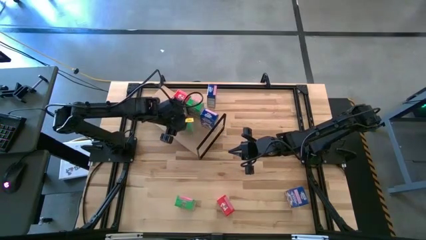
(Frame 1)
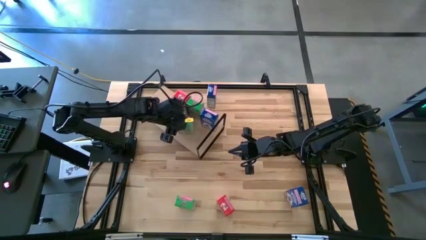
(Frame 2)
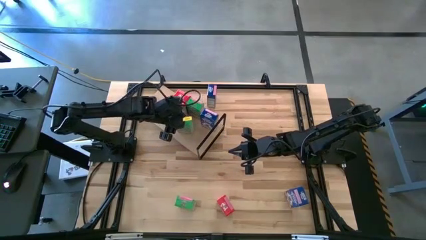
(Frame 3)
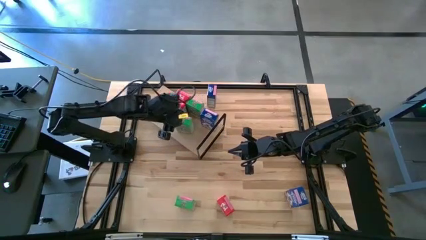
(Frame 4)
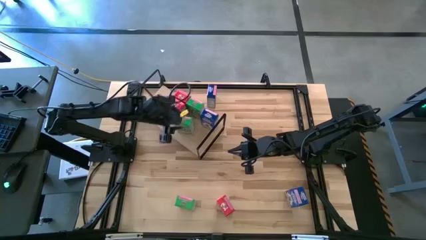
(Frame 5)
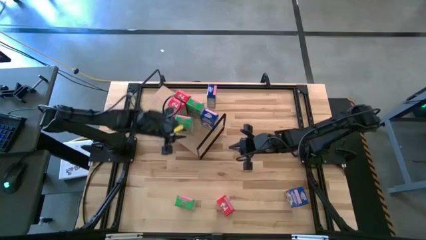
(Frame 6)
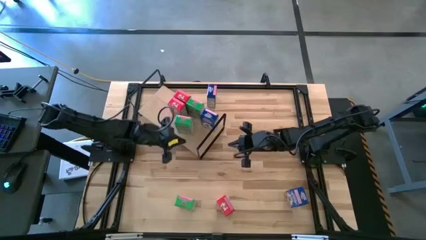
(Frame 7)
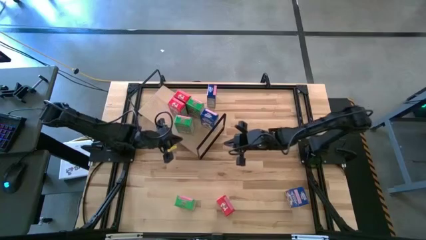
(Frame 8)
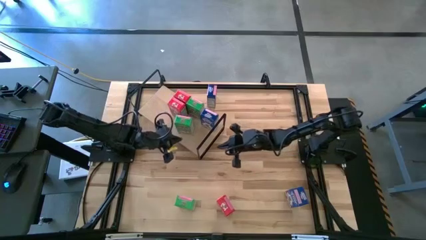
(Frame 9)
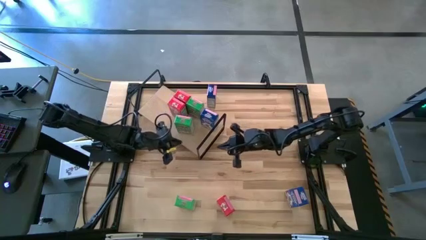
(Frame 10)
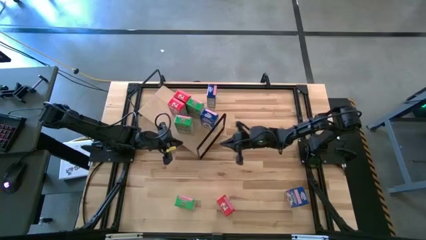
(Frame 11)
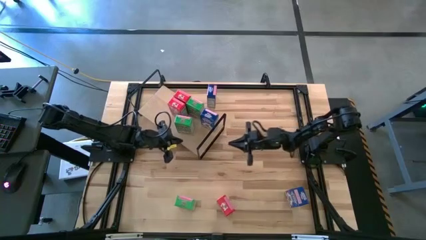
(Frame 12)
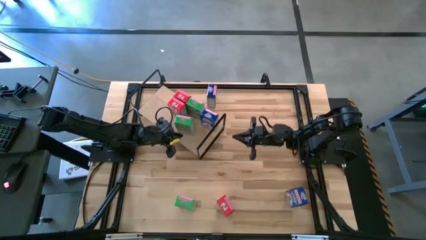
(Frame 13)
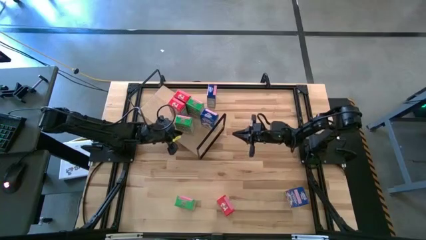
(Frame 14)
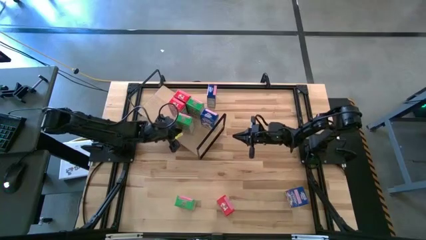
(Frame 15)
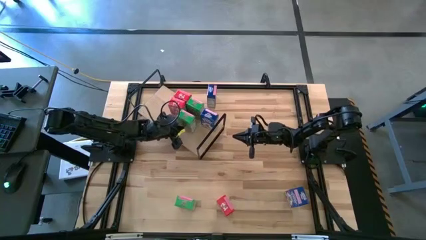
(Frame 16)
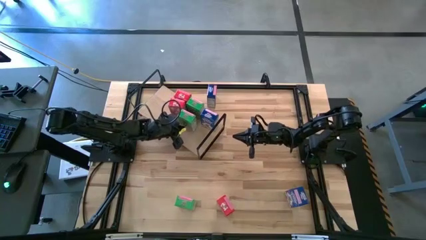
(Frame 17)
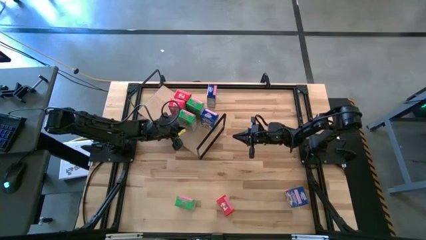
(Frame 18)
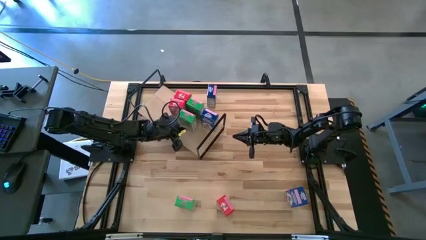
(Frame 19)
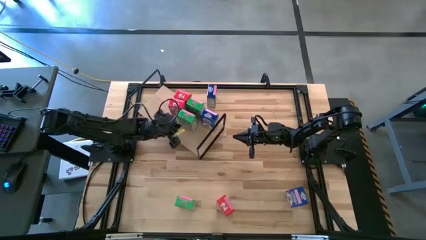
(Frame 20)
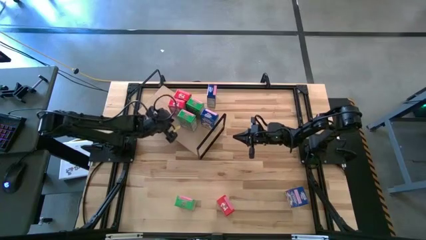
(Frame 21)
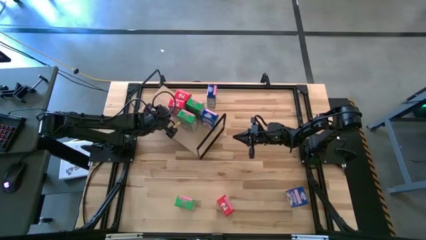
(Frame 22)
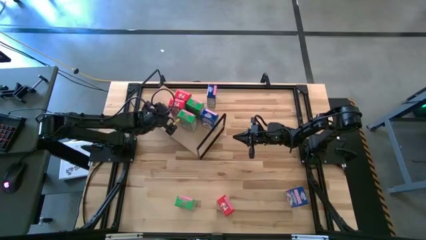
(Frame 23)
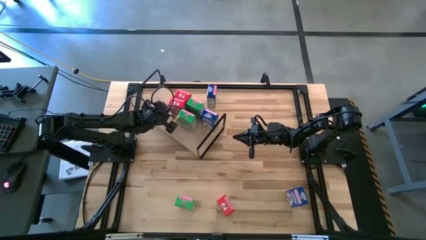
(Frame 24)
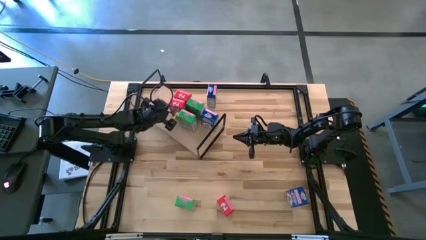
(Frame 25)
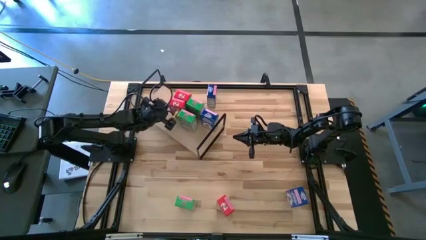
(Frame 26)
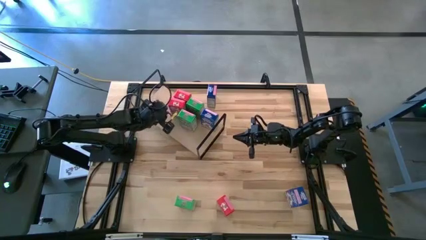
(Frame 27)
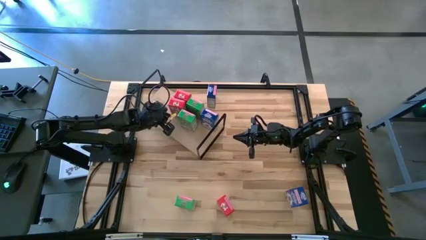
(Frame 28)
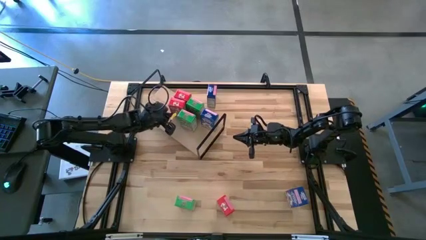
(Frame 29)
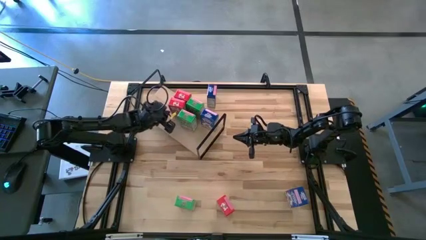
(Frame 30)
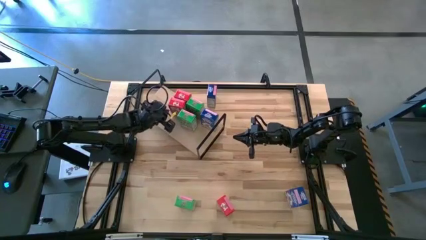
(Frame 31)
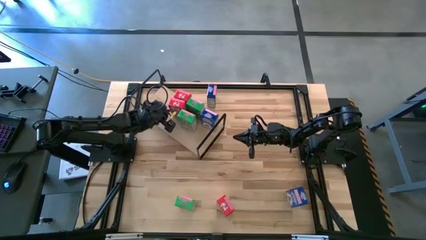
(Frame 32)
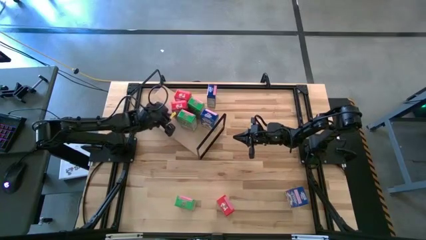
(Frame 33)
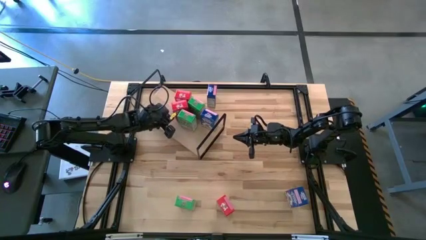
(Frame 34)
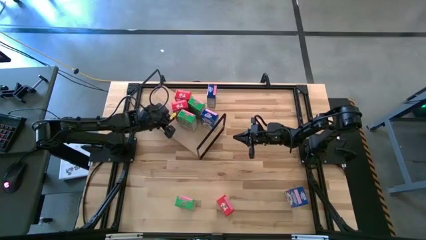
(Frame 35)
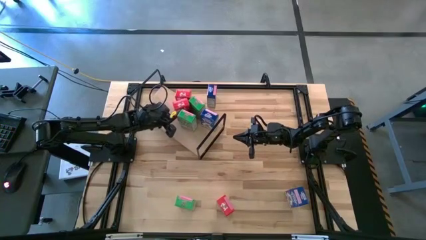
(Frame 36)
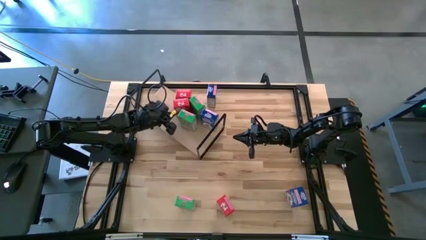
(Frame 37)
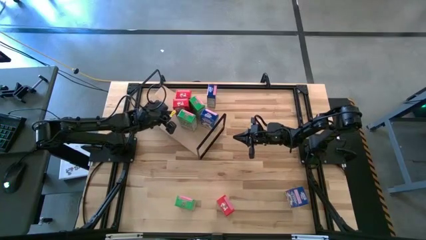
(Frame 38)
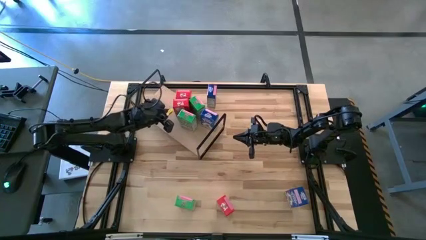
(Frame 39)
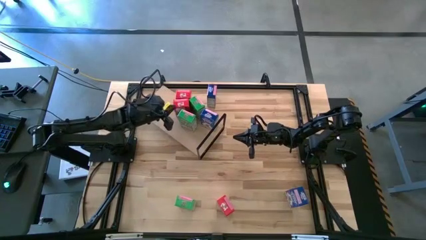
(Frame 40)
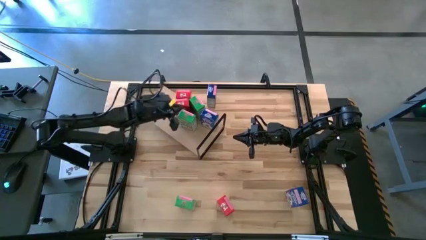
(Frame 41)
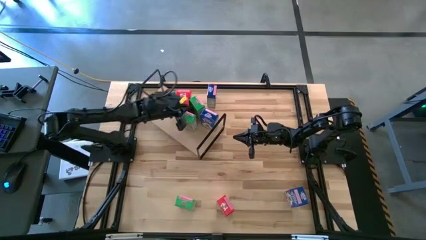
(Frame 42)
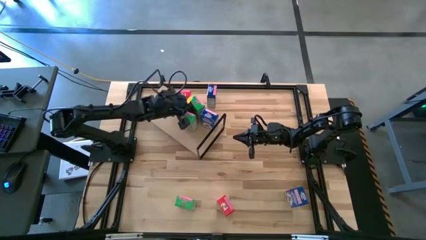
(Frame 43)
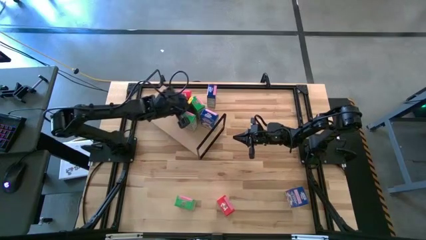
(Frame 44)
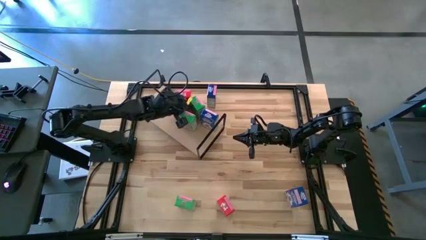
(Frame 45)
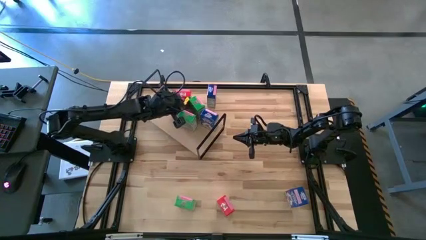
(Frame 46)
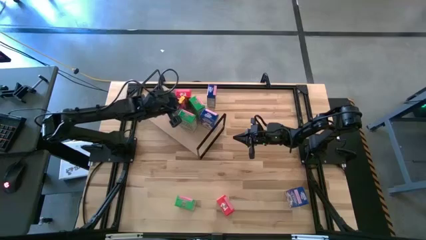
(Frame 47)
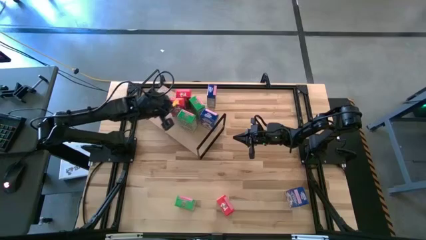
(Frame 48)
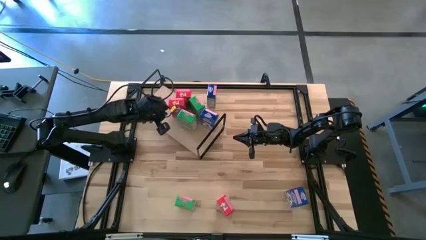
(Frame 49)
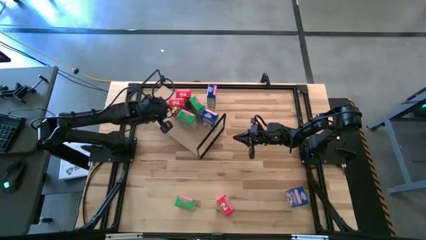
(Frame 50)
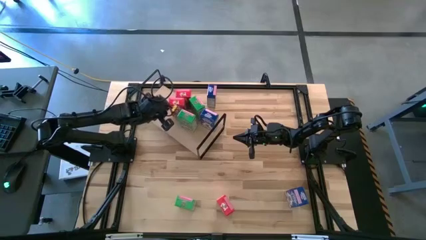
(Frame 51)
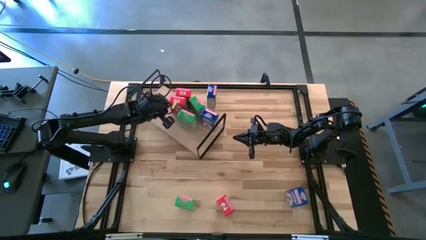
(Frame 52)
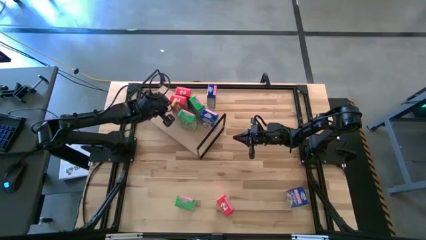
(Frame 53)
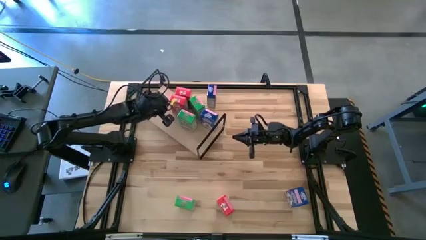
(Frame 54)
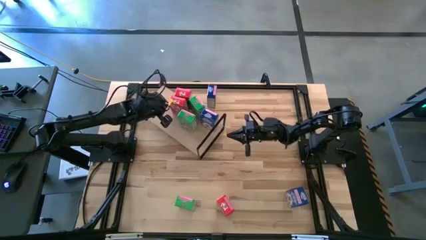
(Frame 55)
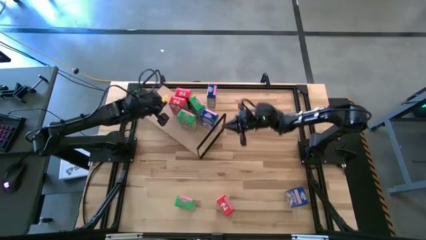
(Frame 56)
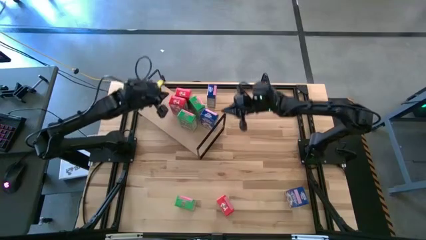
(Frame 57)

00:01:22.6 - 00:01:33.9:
Task: Stack cereal on shelf
Adjust the cereals on the shelf

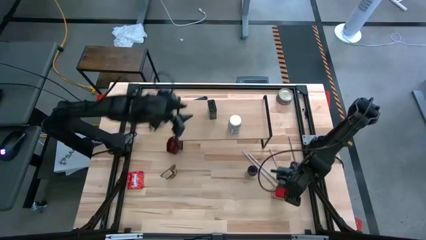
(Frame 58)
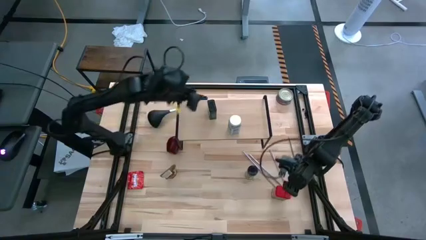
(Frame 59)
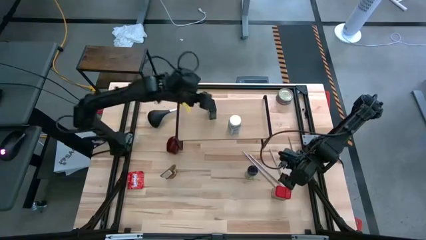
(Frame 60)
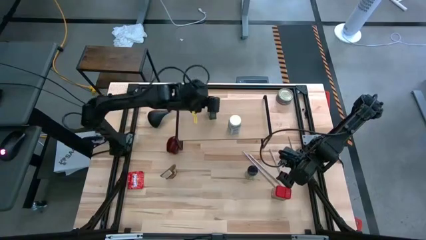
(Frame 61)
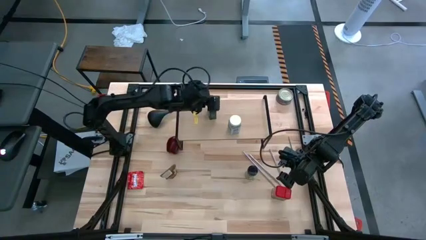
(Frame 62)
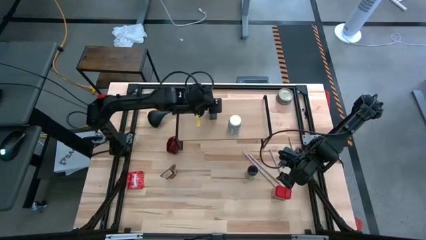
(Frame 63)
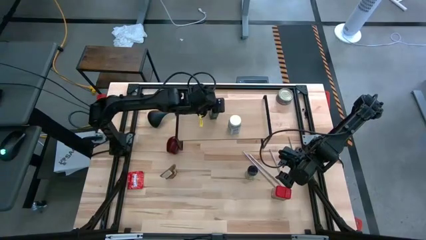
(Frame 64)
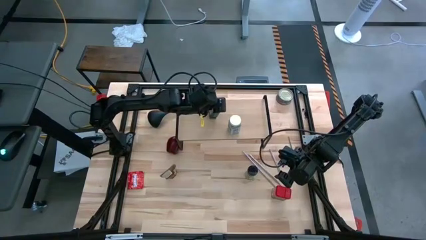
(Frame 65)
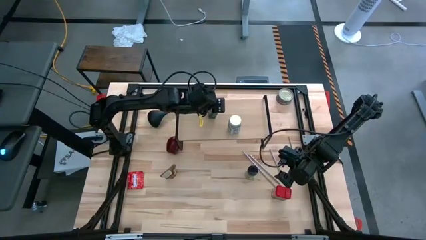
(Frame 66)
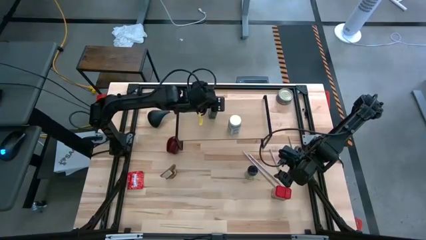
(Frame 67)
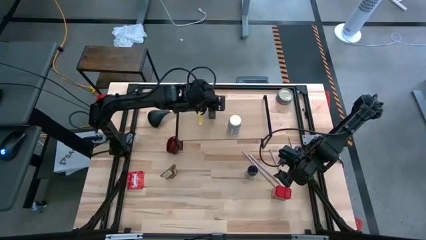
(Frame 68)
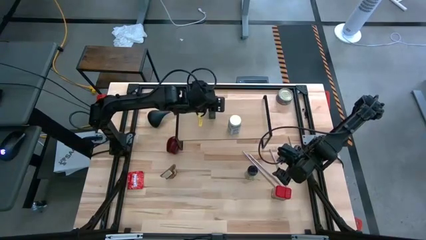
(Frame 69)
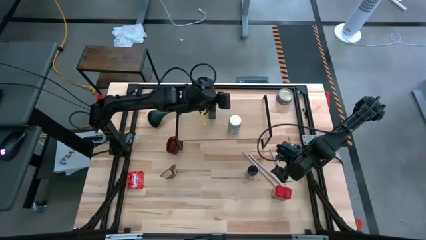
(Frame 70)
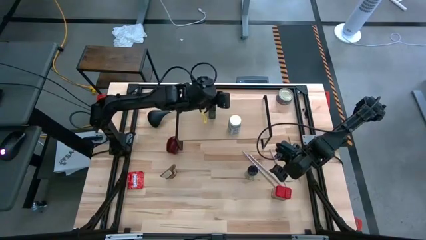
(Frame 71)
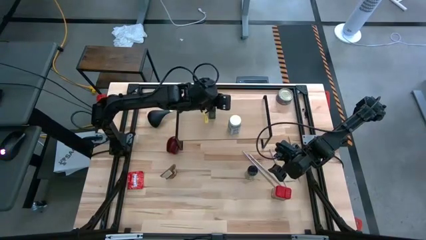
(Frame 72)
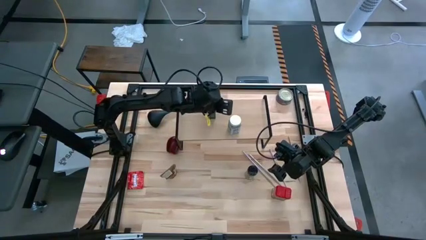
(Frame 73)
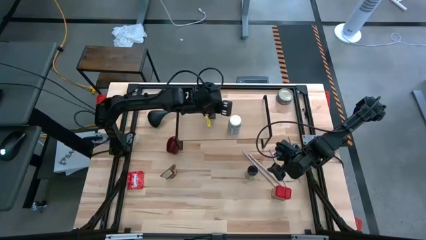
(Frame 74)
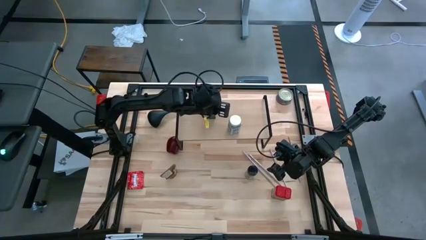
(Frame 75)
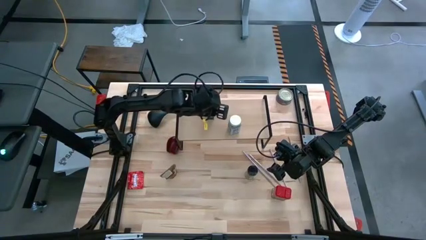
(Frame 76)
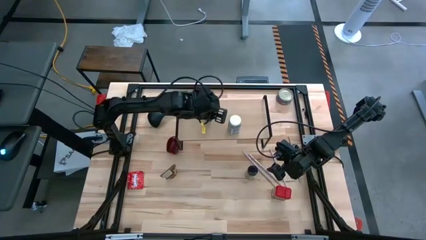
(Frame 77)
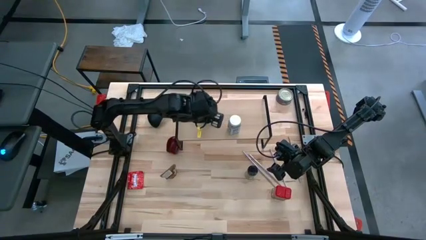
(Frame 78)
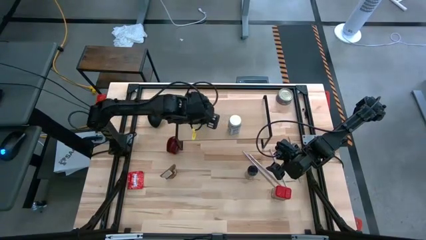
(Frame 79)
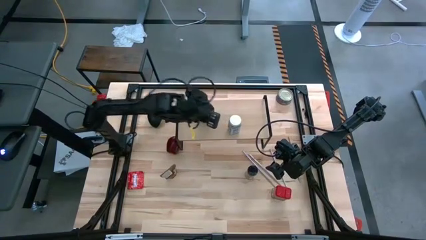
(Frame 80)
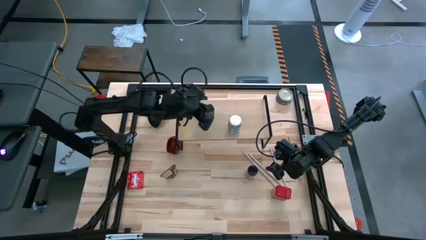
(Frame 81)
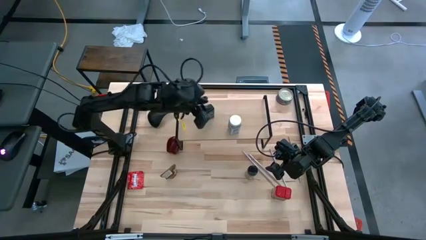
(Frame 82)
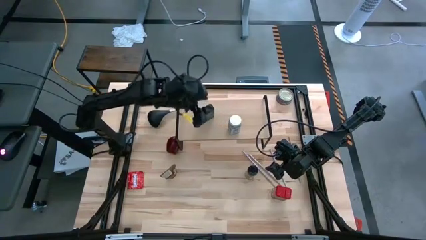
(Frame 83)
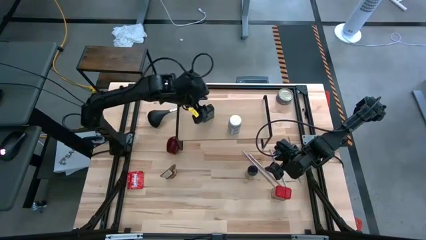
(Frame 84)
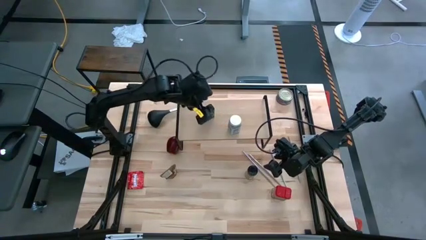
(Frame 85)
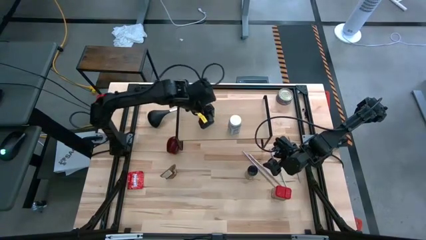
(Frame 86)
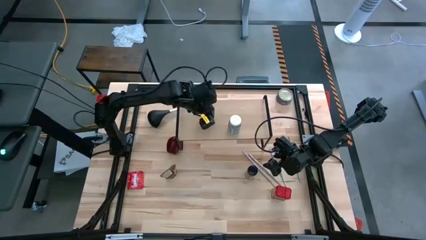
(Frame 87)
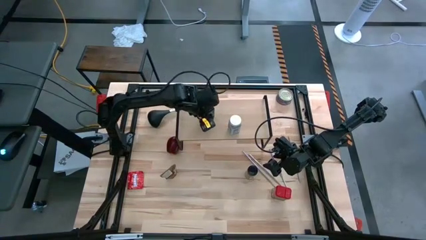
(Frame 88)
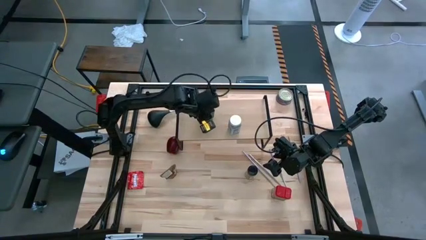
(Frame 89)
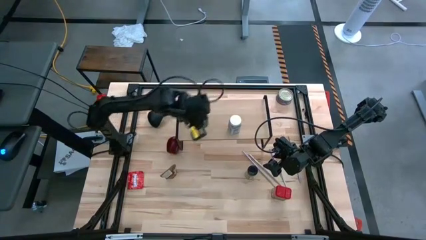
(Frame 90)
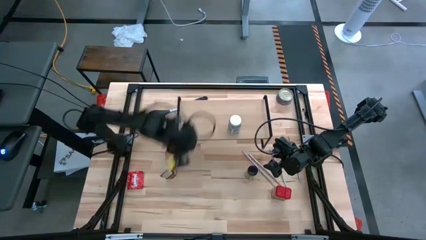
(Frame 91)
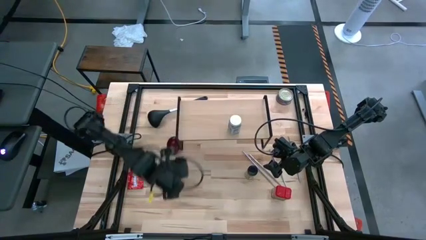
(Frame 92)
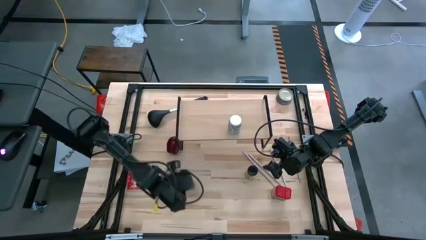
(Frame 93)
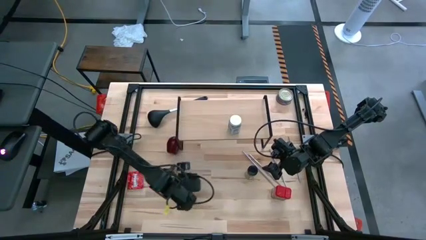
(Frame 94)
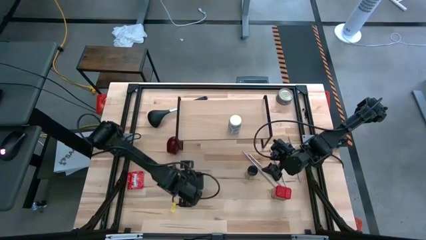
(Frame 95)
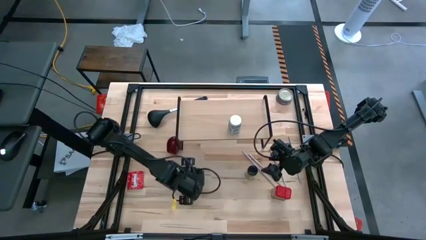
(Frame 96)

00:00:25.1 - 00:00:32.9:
Task: Shelf spices
Remove the black seasoning can from the shelf
